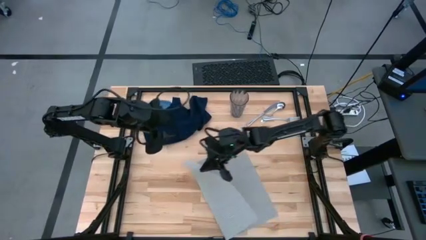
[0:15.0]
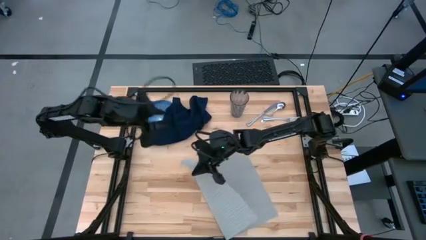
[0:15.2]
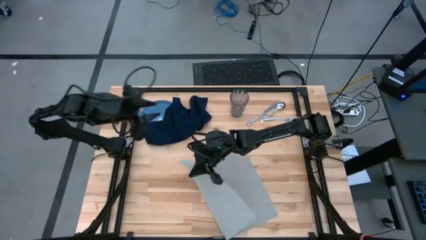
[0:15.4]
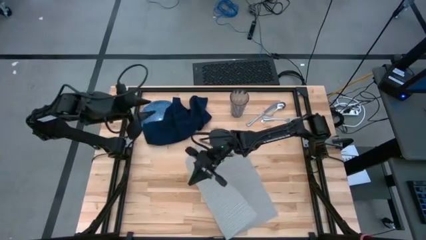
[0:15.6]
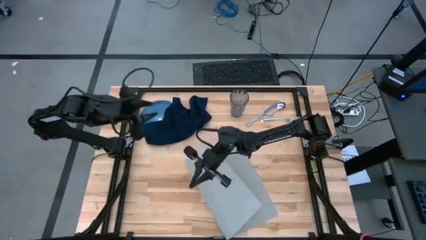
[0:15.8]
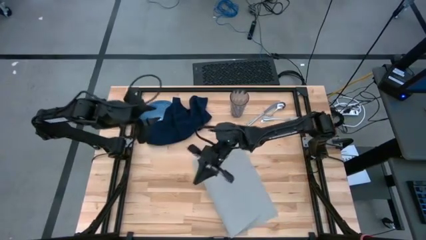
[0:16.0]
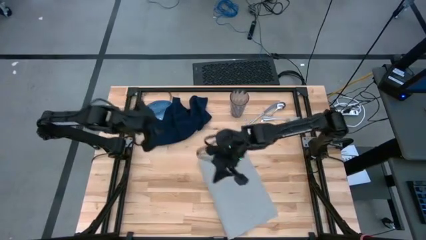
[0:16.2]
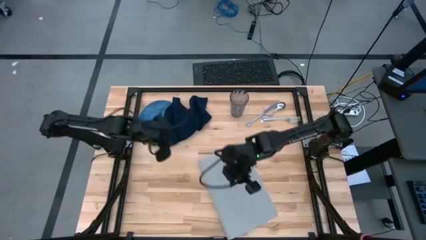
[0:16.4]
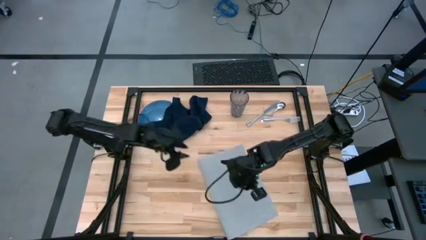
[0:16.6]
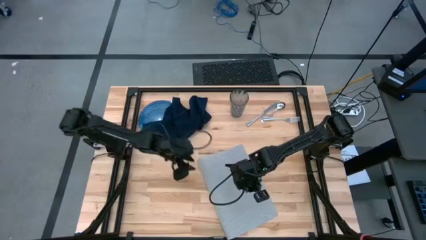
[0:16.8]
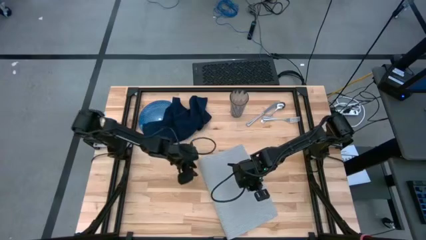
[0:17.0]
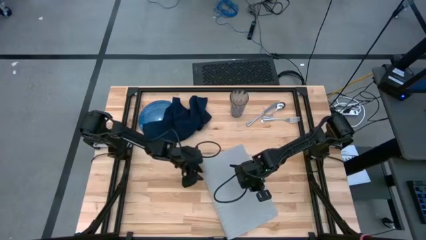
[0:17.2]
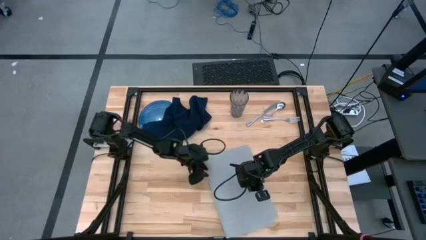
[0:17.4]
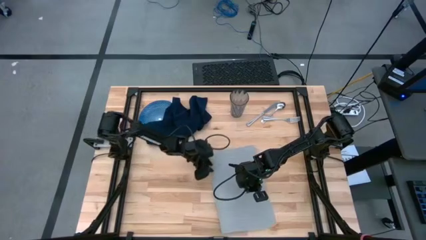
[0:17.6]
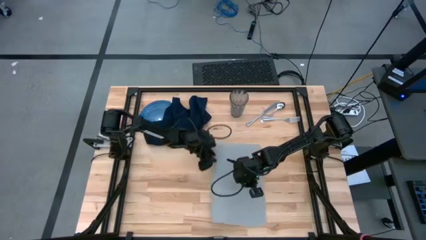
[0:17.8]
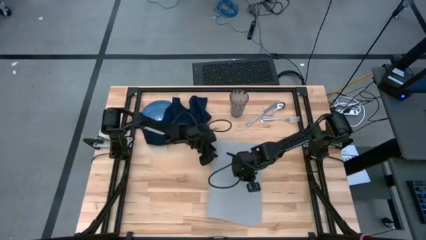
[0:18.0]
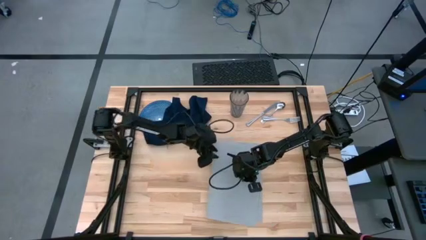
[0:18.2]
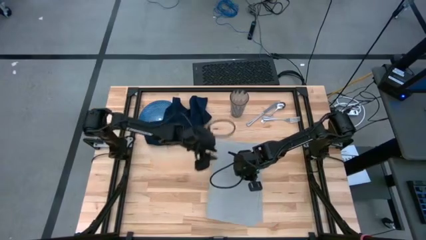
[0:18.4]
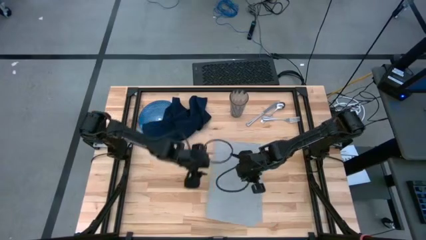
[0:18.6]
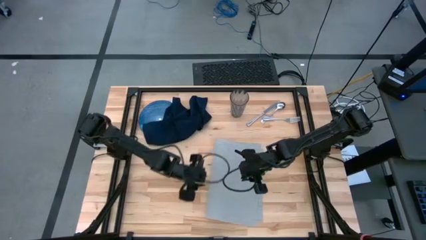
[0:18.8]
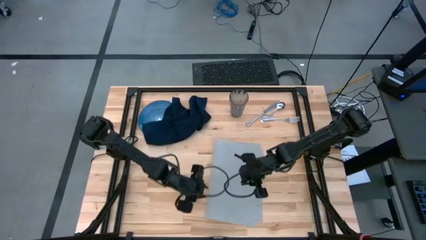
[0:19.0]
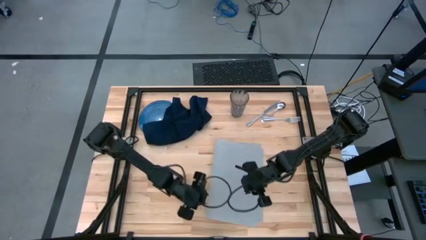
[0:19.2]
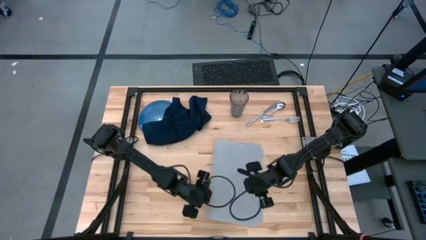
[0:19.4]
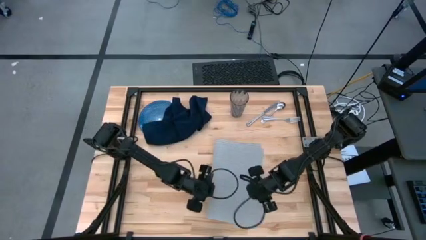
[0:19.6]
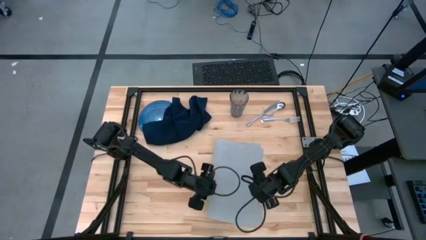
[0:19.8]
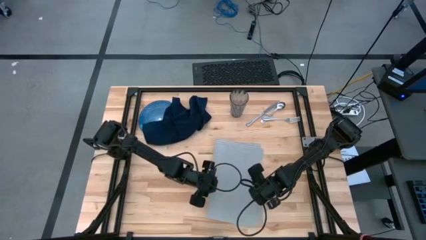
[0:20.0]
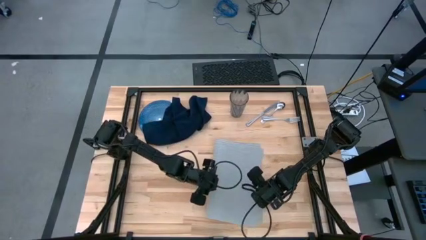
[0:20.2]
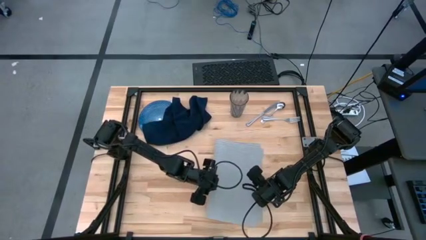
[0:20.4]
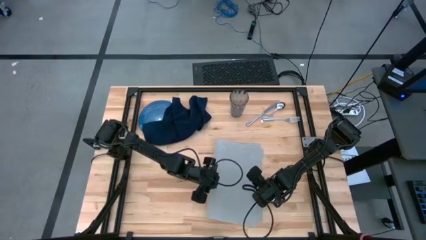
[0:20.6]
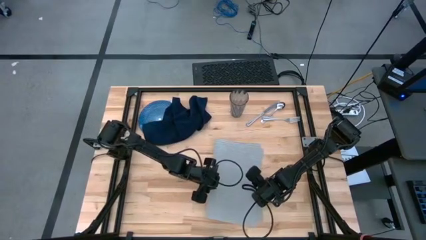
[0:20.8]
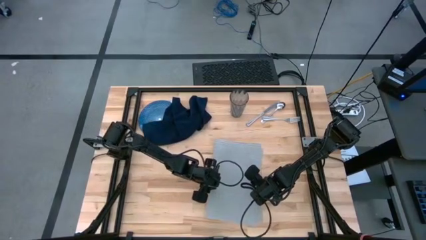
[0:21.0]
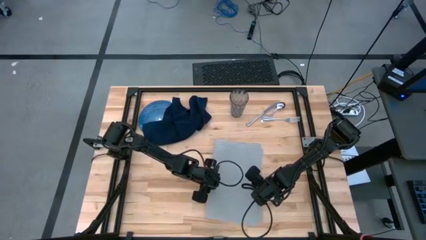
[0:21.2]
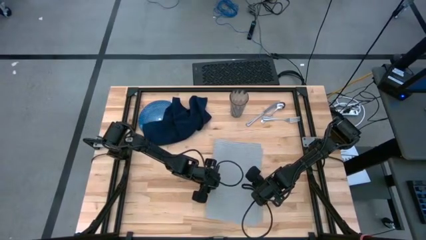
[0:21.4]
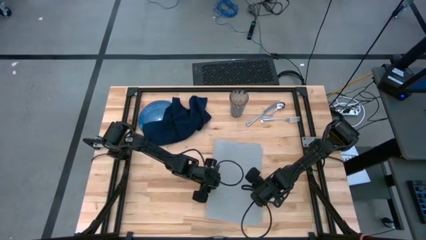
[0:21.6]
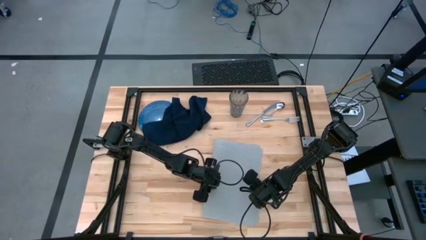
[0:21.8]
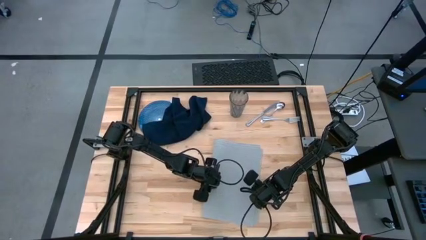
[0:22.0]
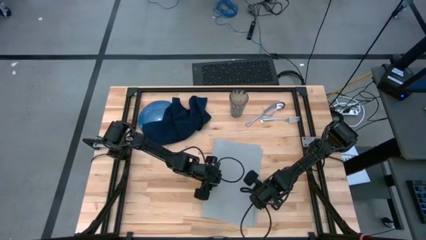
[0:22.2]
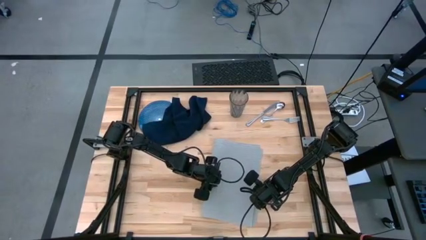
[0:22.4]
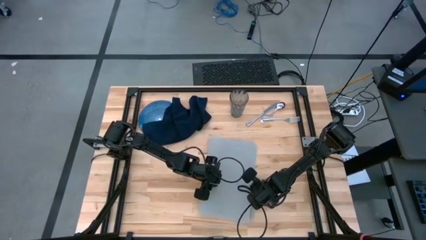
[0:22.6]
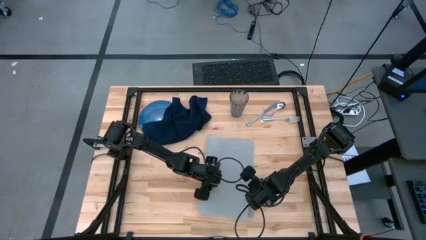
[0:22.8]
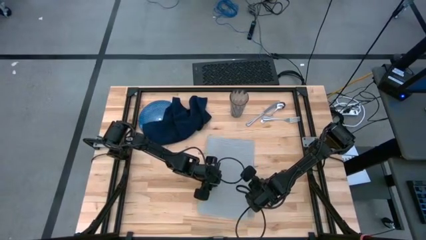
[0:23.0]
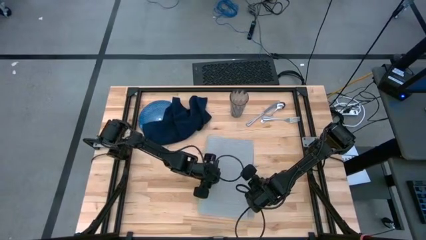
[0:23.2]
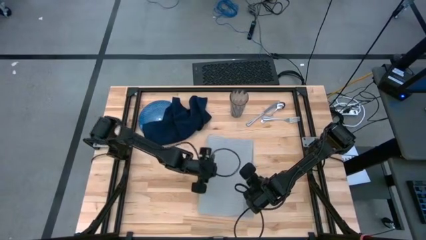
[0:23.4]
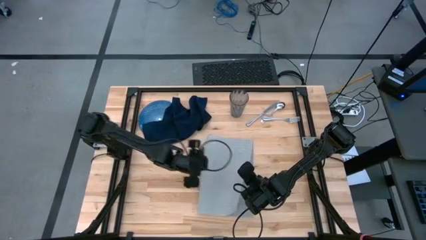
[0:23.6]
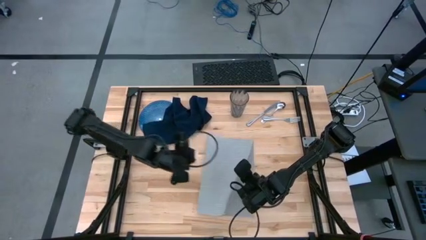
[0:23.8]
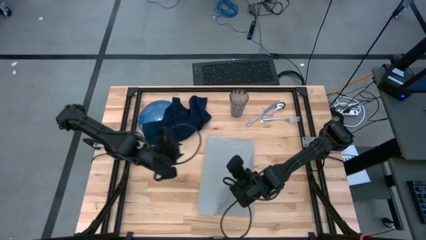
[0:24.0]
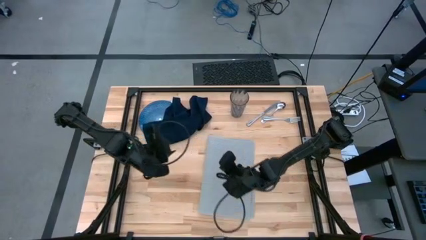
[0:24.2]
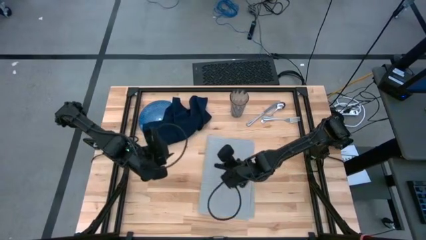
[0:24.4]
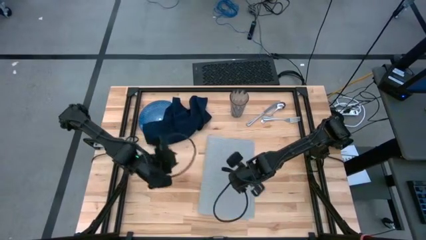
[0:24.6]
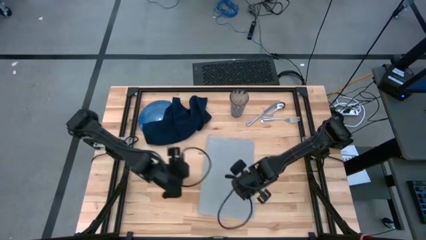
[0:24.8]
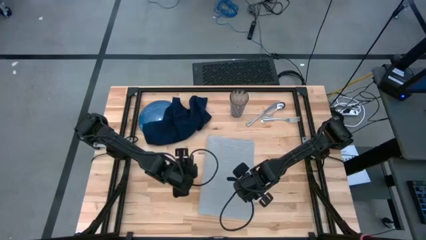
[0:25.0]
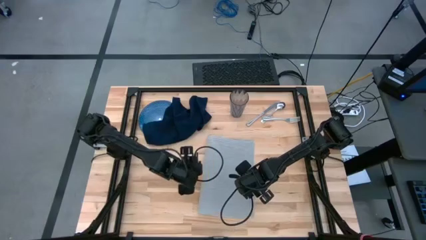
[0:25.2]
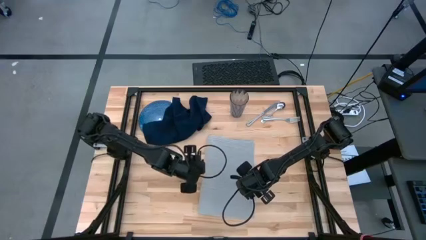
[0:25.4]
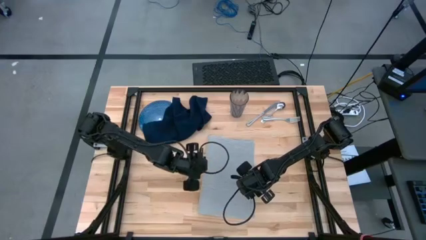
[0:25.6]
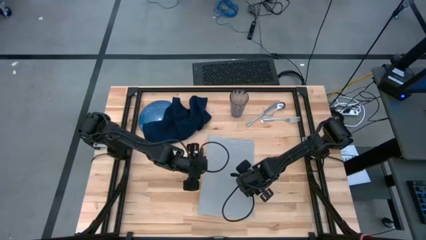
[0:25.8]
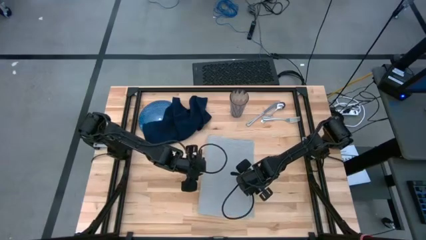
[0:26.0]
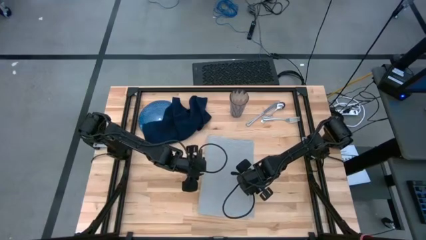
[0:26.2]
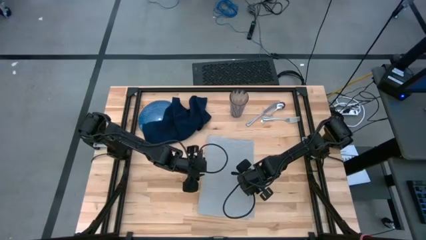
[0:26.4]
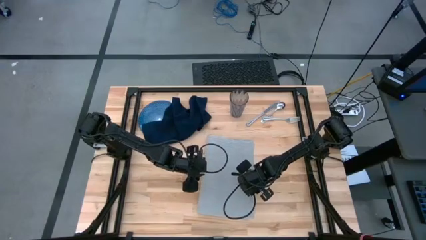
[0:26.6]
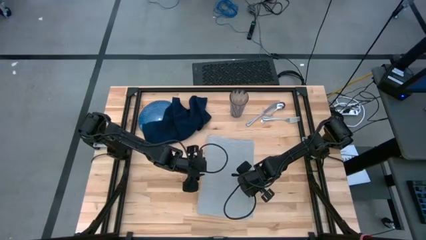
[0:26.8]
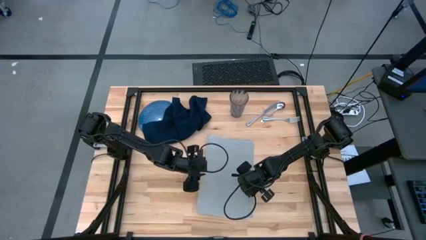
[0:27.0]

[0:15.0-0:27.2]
Task: Set table place
Prepare the gray placemat

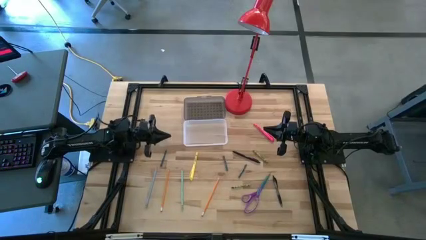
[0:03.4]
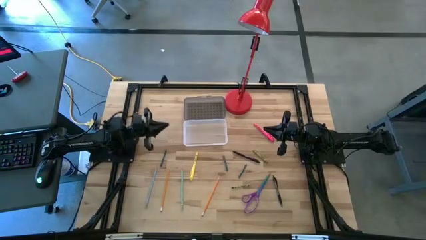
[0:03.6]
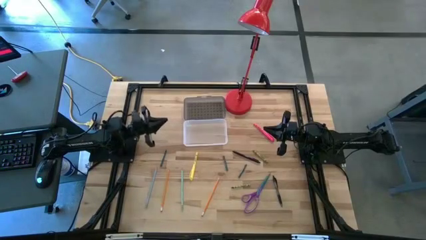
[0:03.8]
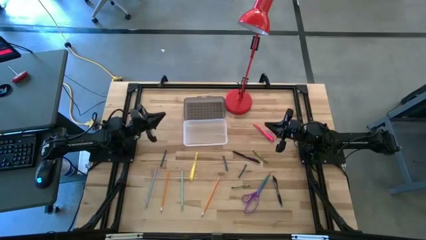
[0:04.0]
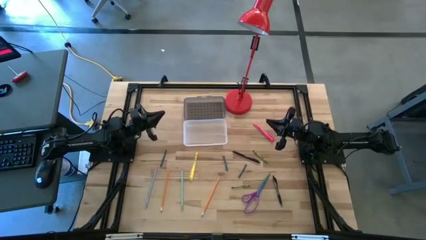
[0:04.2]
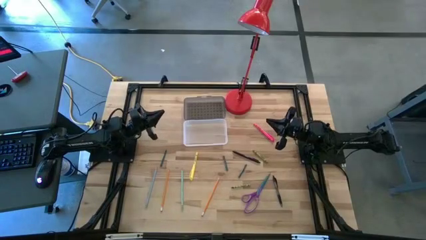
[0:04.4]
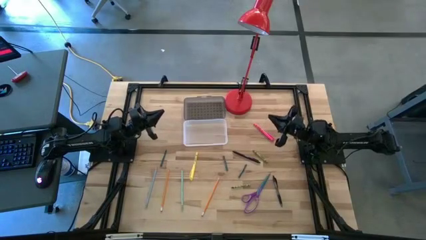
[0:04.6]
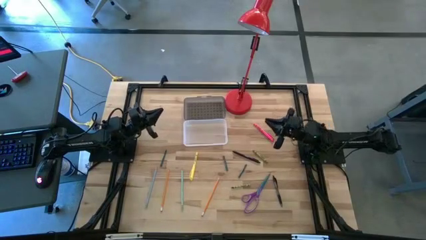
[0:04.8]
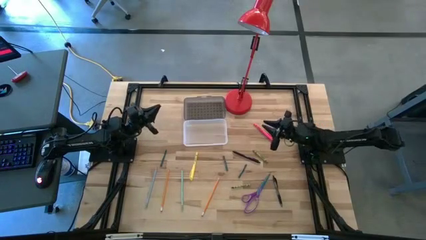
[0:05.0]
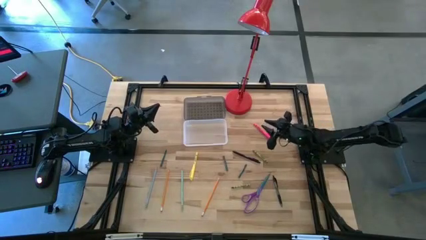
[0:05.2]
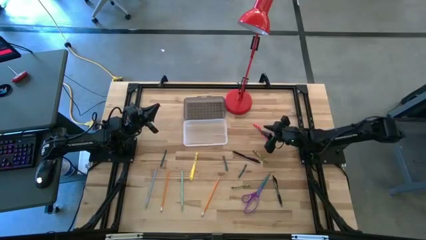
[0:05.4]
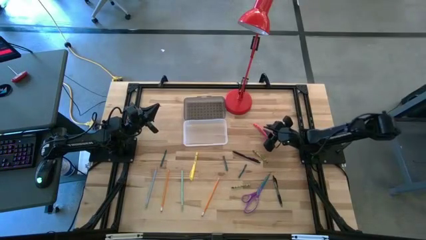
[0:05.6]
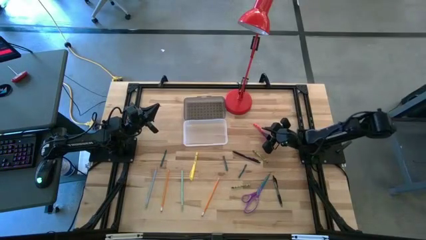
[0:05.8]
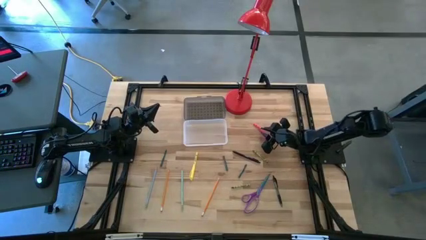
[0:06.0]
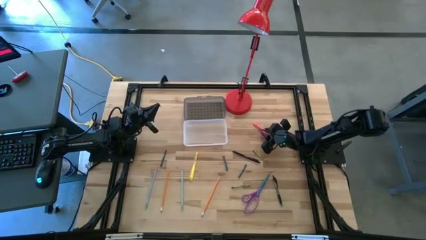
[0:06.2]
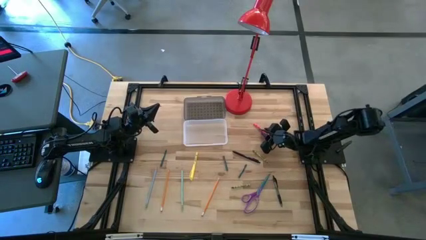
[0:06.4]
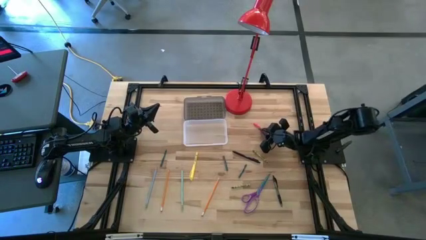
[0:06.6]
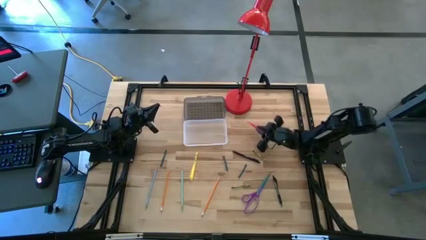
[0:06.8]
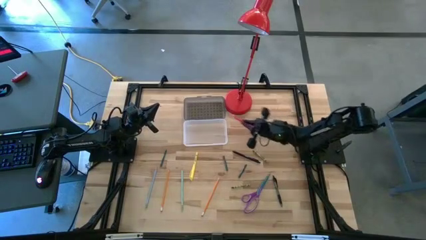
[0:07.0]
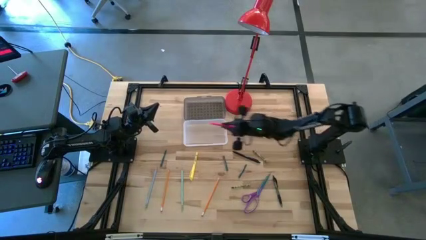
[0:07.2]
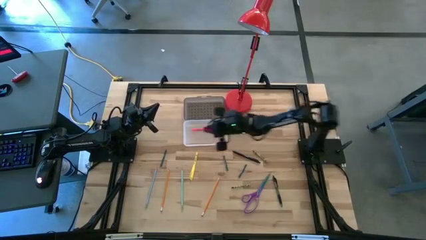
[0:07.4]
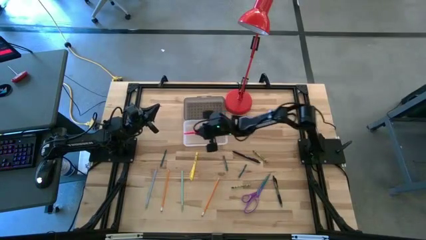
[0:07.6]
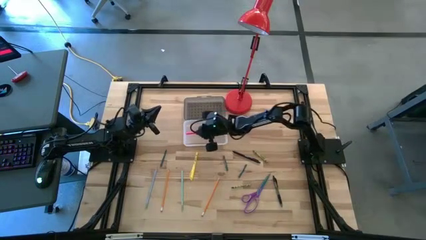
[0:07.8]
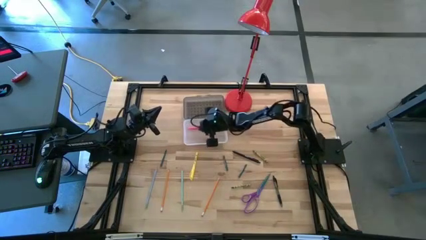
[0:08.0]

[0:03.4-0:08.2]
Task: Pick & place school supplies into a supply box
Put the pink pen into the black supply box
